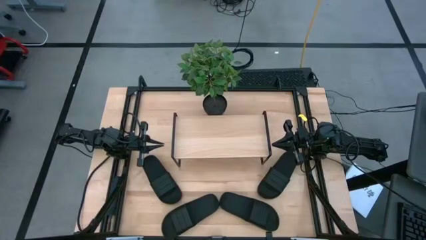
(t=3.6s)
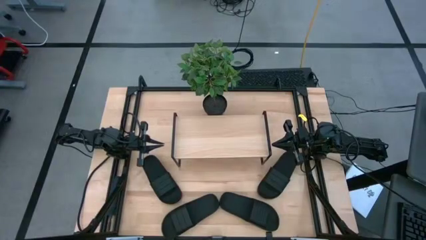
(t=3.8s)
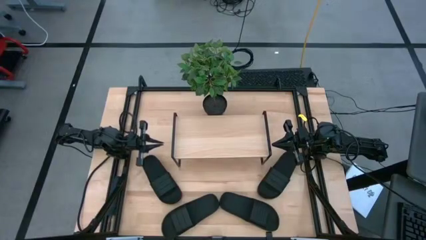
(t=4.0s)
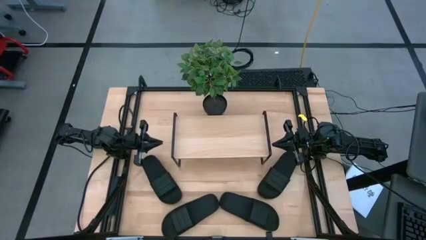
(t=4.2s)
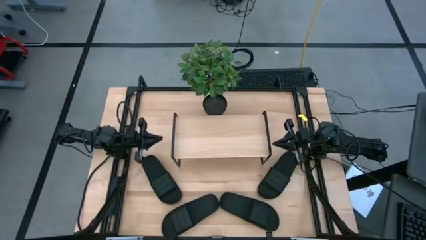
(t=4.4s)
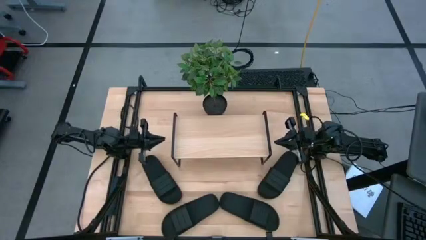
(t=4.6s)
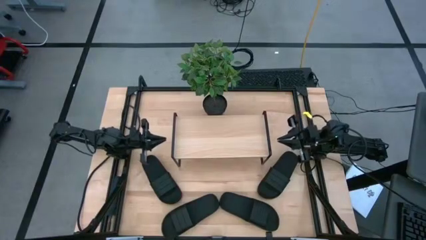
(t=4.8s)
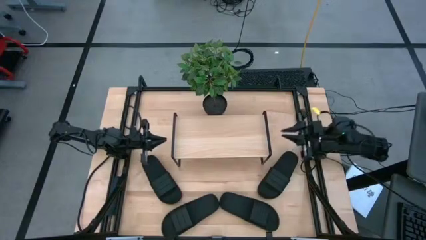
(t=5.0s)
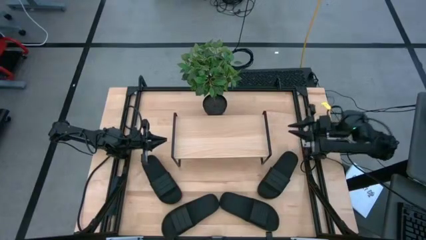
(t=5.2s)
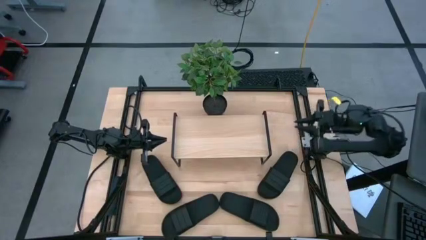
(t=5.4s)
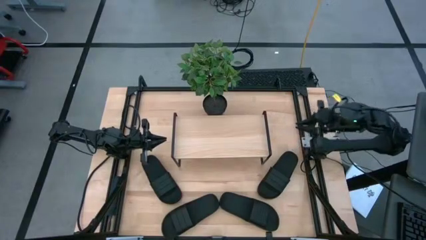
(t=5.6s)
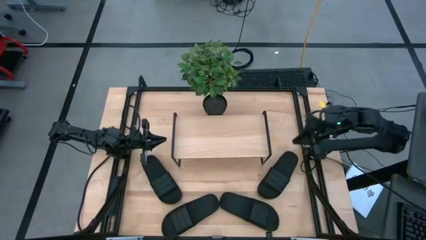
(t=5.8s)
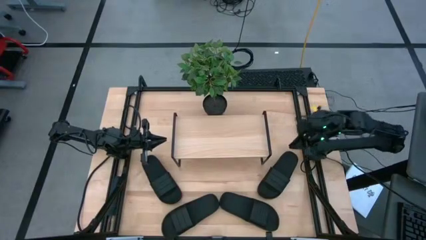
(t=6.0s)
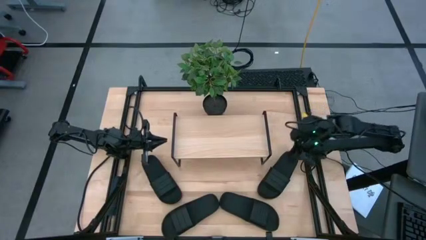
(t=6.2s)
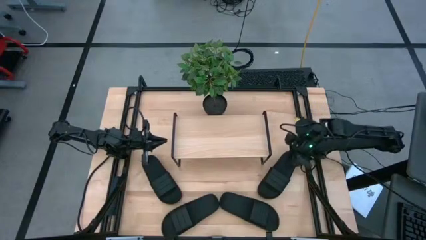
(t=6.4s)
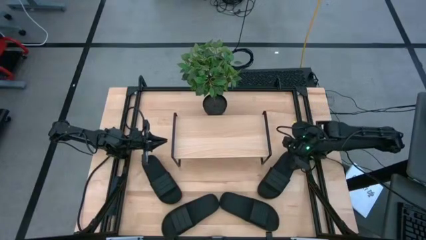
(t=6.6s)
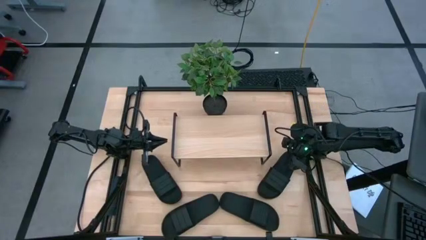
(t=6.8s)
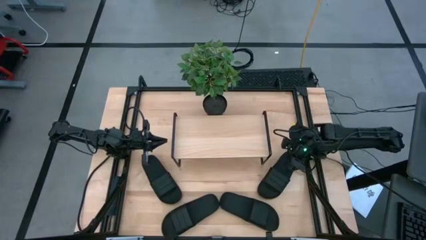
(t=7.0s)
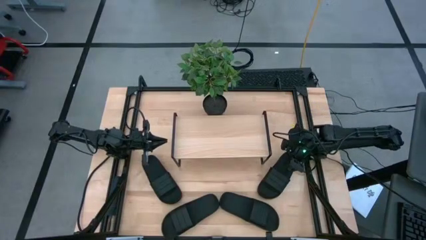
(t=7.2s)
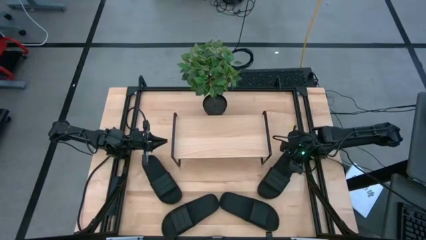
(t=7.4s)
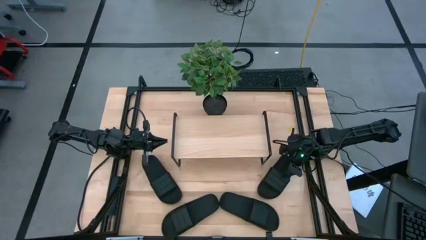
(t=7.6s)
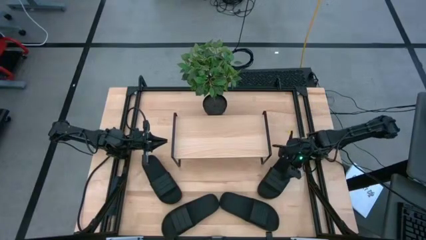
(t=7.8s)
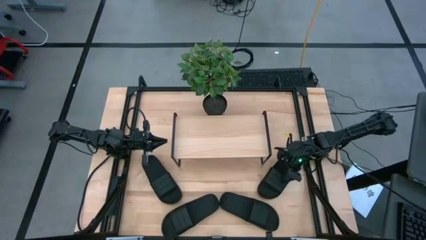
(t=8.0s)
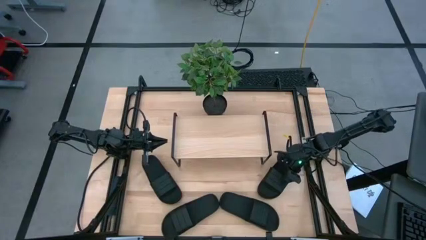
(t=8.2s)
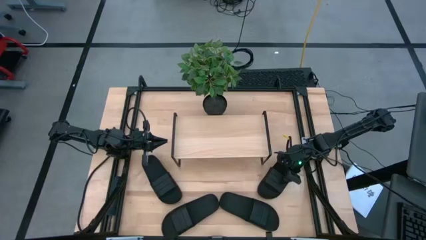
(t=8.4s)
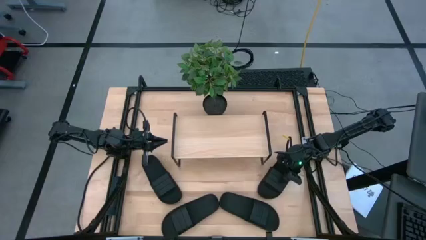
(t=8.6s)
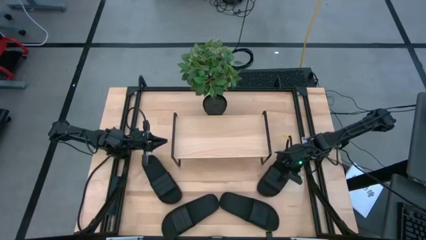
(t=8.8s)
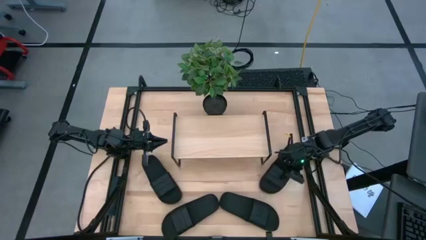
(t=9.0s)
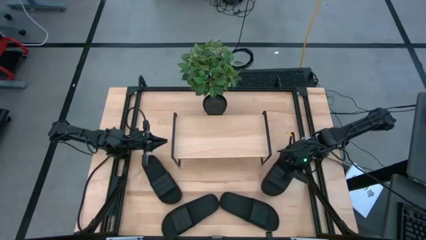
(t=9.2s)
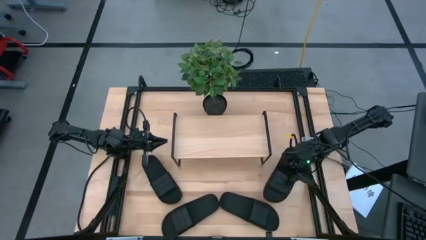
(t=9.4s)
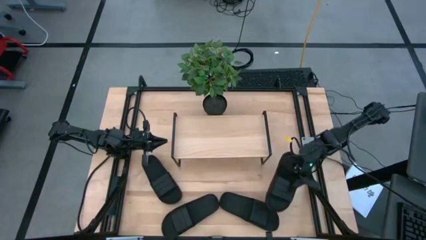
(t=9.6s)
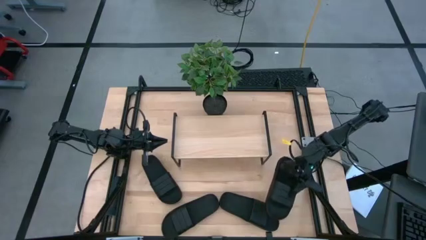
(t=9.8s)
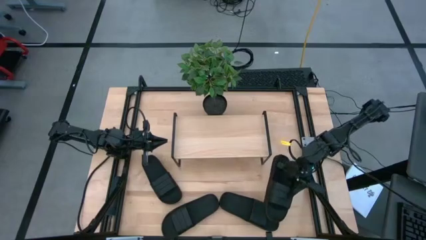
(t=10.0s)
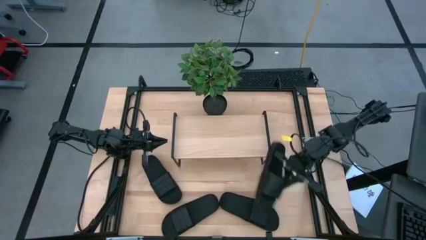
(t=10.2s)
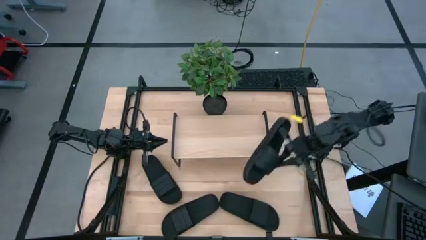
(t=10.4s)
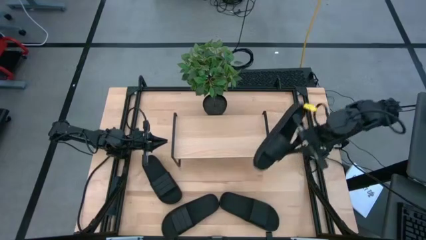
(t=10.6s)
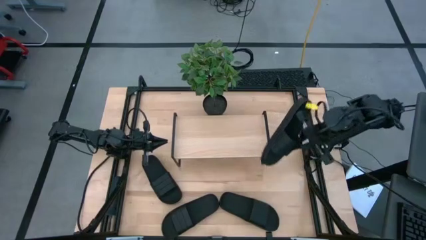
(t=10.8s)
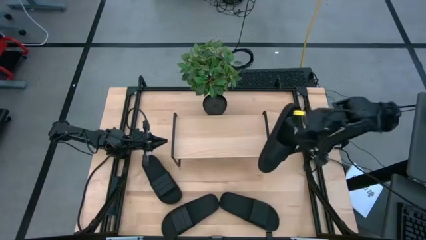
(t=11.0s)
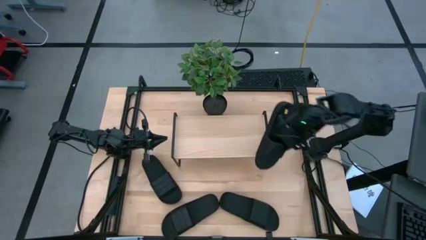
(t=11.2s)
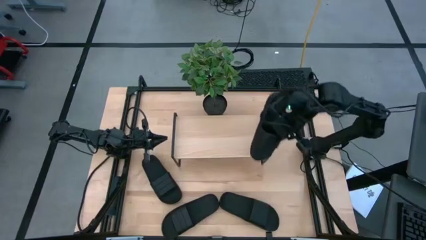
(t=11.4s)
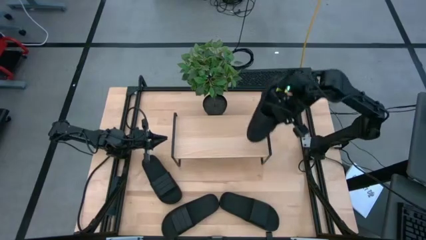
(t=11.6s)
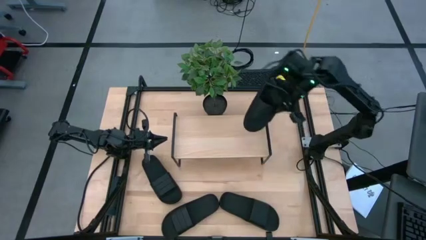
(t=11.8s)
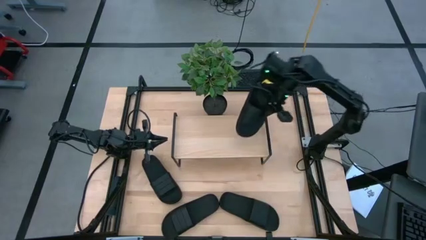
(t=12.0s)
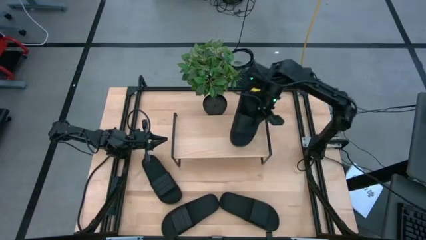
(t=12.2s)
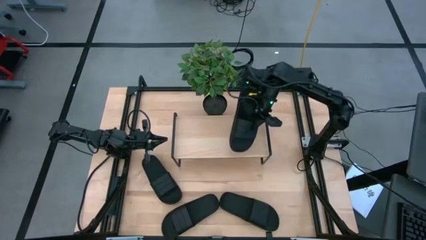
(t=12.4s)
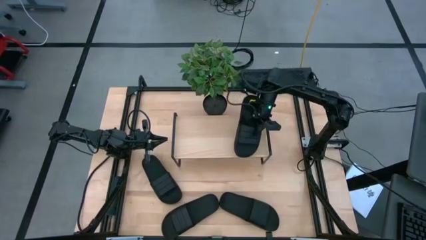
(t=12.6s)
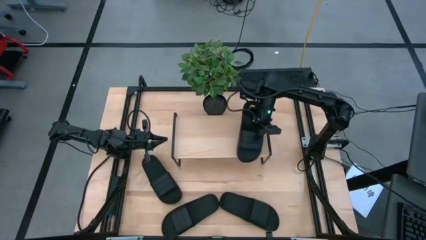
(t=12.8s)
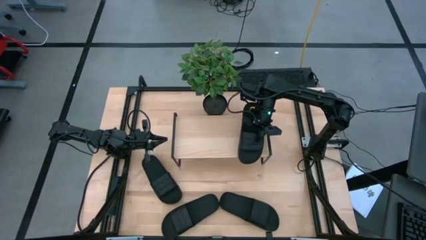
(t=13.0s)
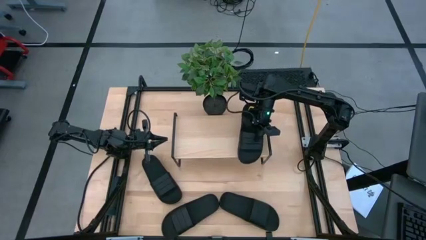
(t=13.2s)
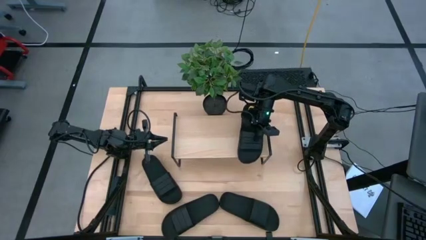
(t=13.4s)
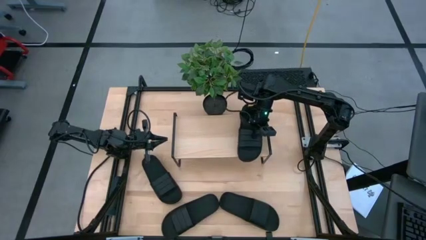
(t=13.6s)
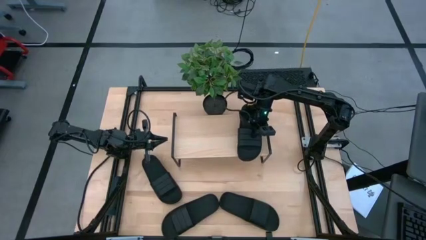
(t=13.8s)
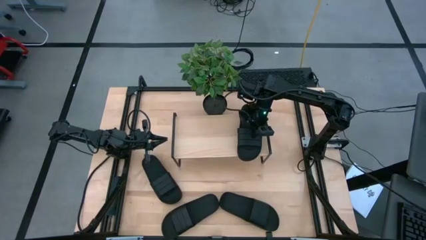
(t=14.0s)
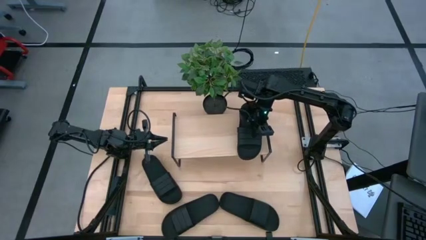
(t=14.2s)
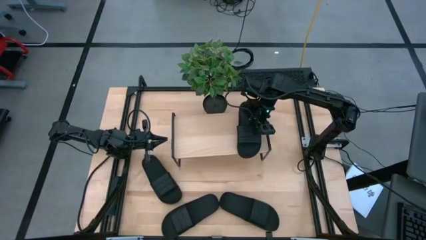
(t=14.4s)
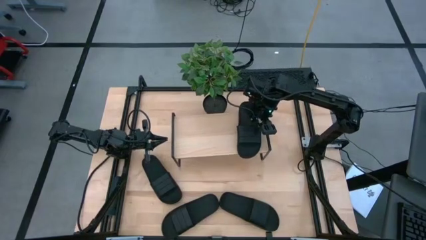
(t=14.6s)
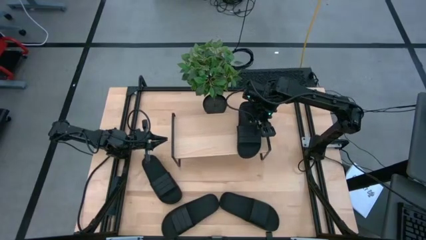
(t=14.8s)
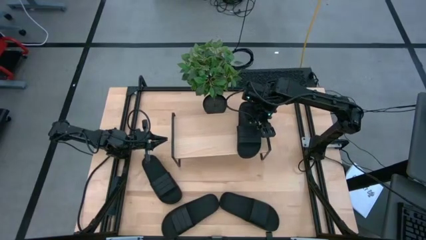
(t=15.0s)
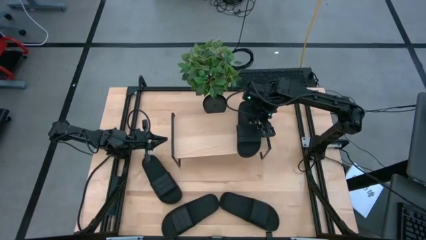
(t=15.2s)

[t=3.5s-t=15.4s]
Task: Pick and place slides into the shelf
Put the black slide on the shelf
